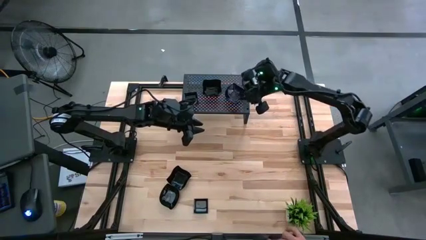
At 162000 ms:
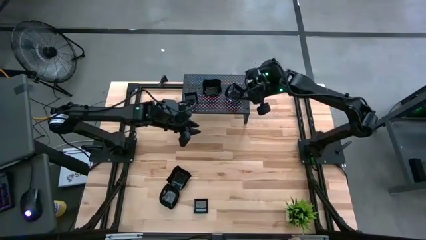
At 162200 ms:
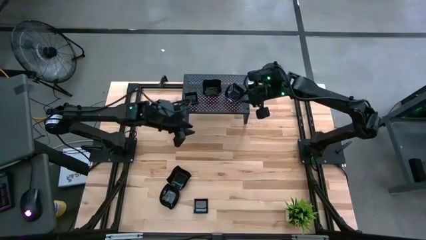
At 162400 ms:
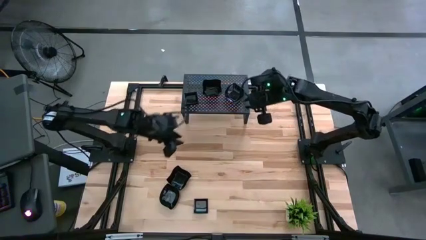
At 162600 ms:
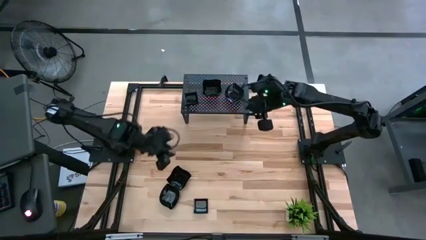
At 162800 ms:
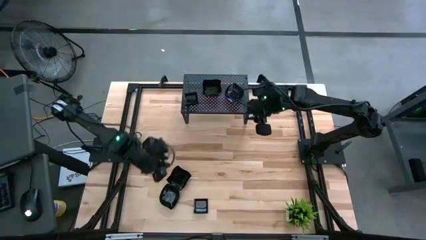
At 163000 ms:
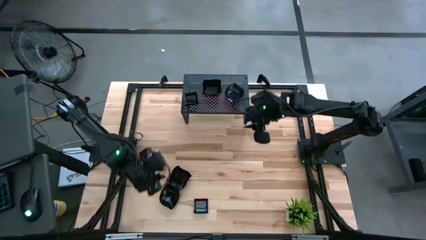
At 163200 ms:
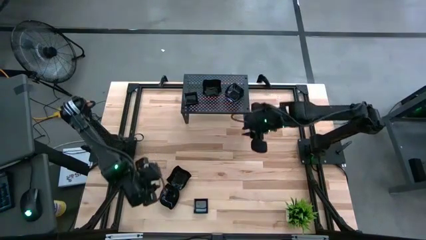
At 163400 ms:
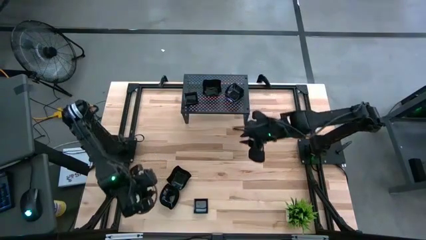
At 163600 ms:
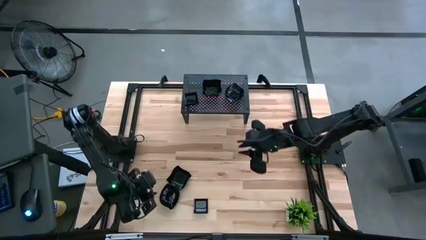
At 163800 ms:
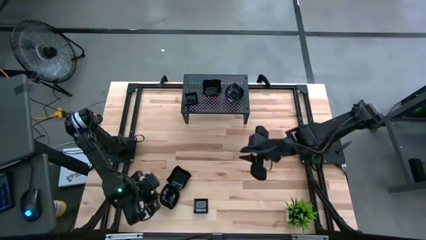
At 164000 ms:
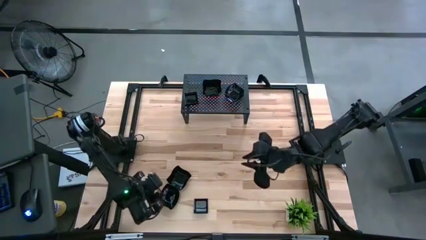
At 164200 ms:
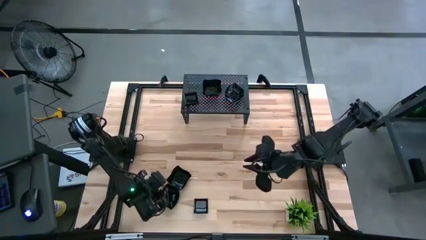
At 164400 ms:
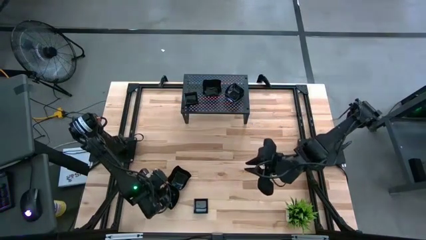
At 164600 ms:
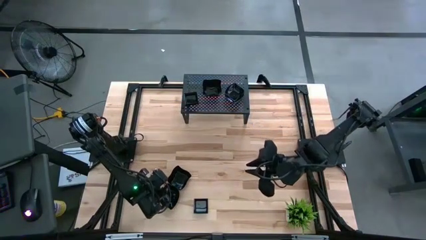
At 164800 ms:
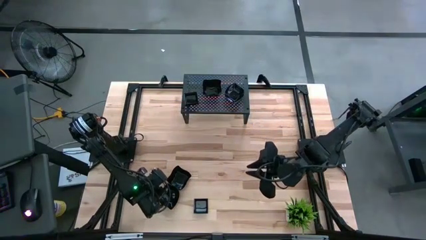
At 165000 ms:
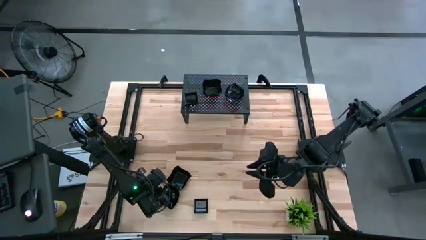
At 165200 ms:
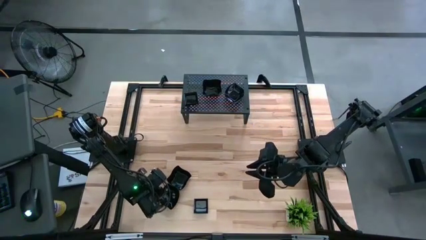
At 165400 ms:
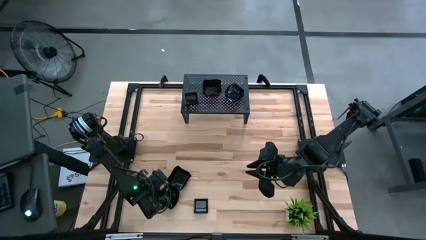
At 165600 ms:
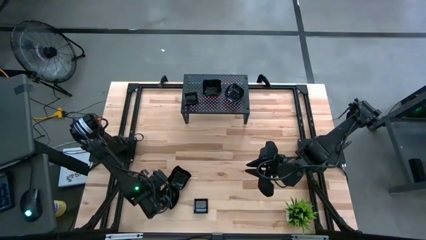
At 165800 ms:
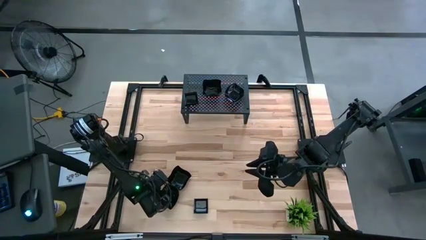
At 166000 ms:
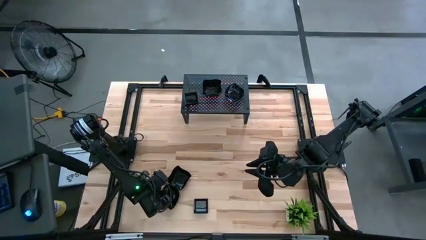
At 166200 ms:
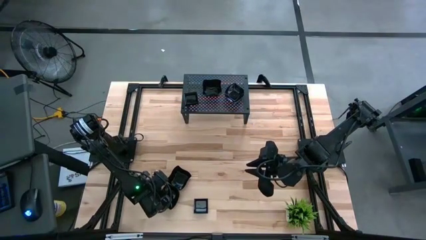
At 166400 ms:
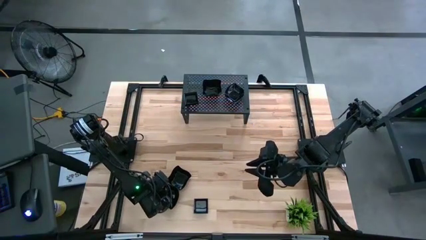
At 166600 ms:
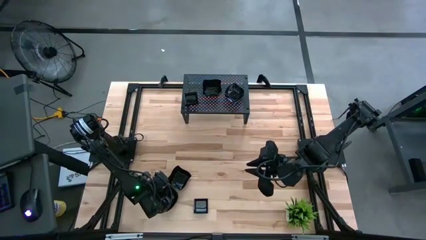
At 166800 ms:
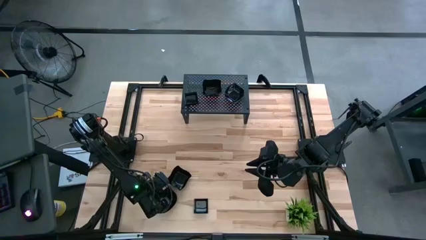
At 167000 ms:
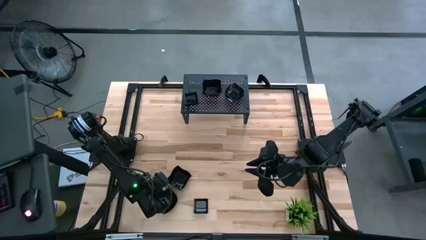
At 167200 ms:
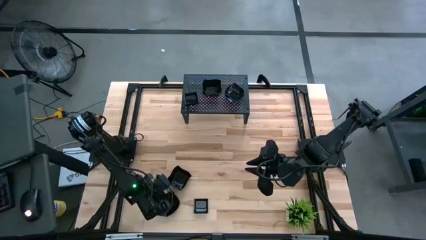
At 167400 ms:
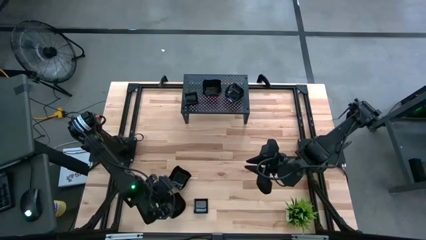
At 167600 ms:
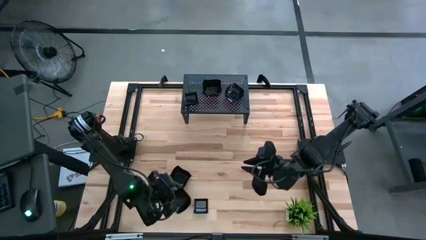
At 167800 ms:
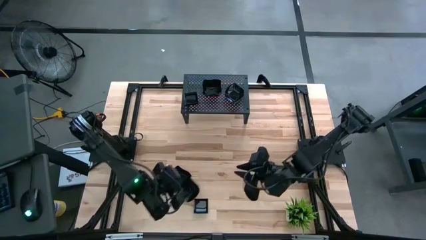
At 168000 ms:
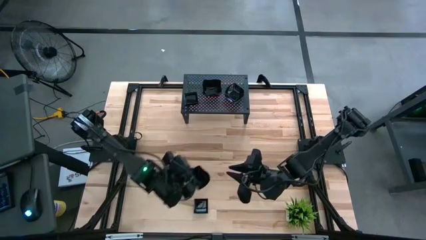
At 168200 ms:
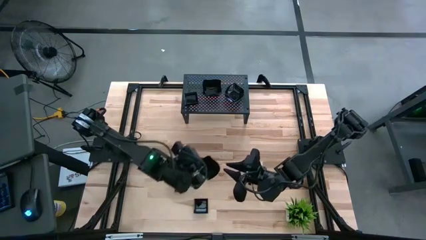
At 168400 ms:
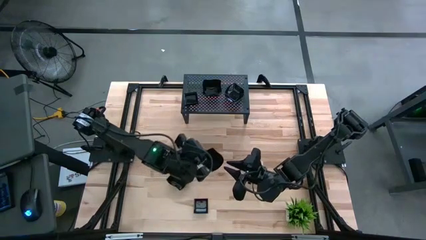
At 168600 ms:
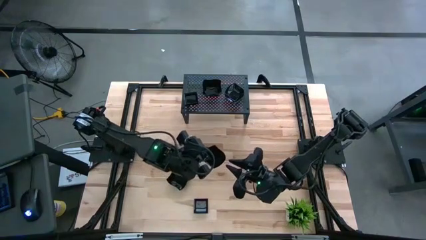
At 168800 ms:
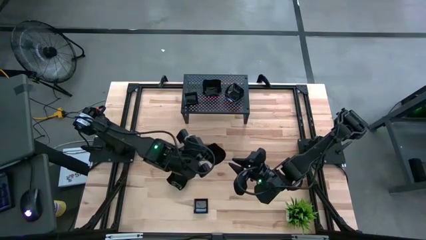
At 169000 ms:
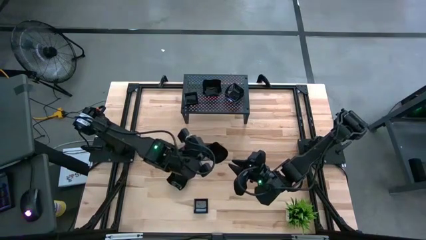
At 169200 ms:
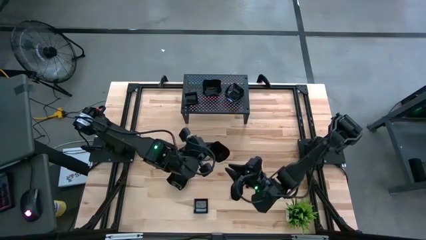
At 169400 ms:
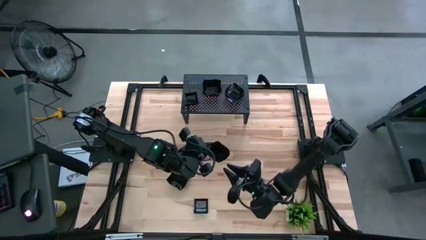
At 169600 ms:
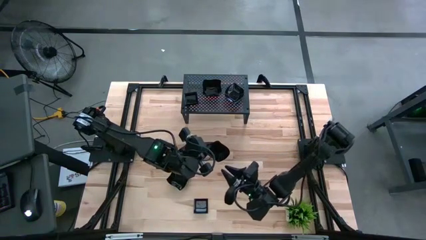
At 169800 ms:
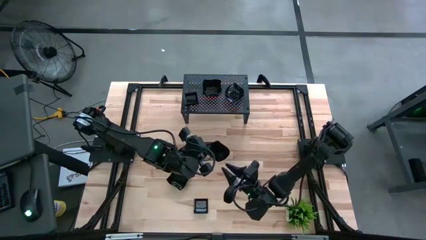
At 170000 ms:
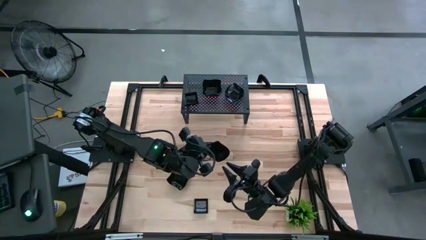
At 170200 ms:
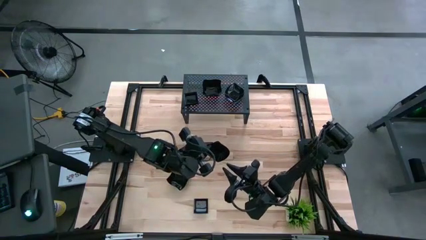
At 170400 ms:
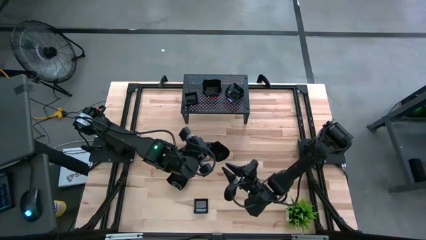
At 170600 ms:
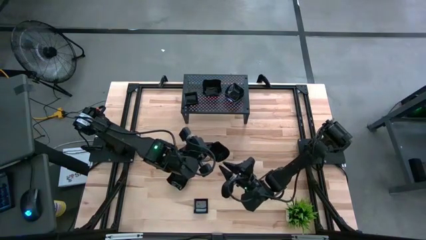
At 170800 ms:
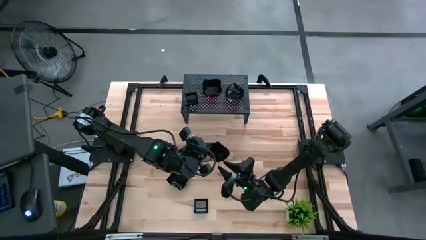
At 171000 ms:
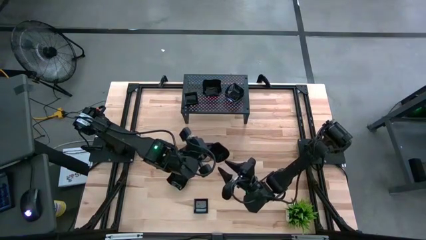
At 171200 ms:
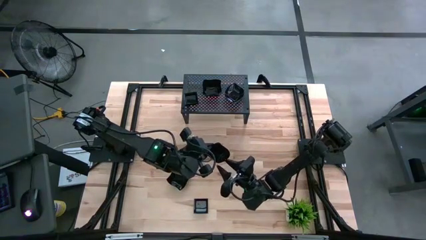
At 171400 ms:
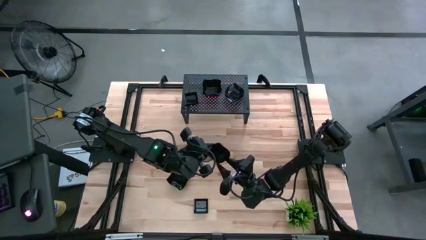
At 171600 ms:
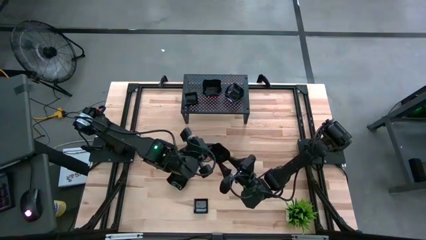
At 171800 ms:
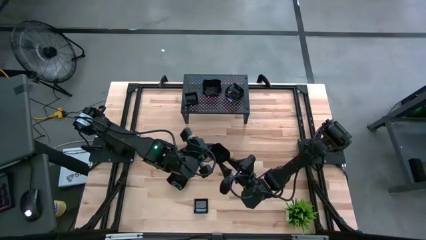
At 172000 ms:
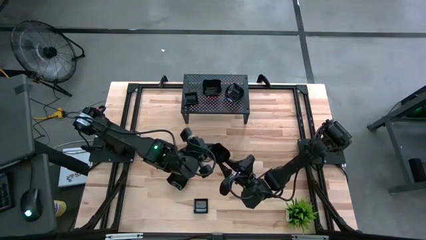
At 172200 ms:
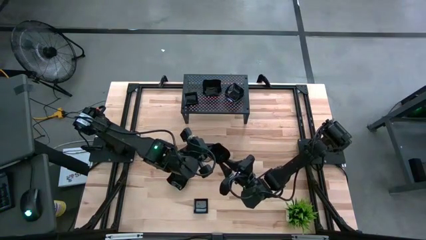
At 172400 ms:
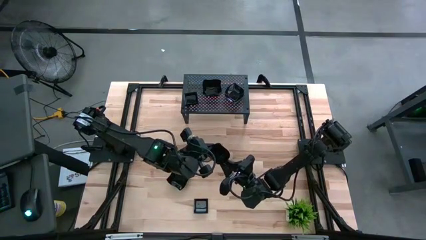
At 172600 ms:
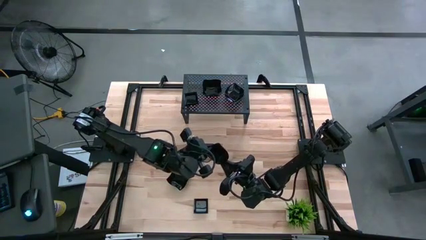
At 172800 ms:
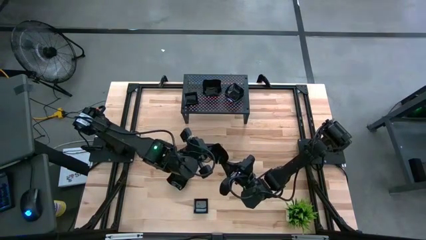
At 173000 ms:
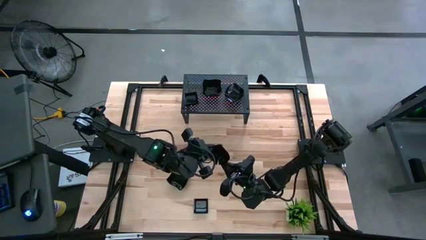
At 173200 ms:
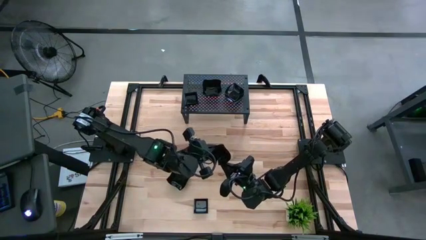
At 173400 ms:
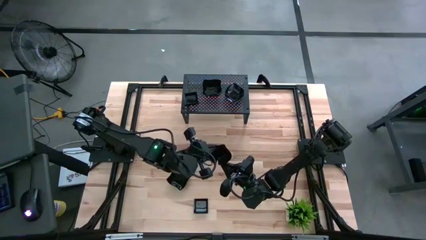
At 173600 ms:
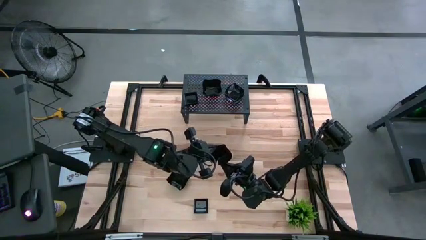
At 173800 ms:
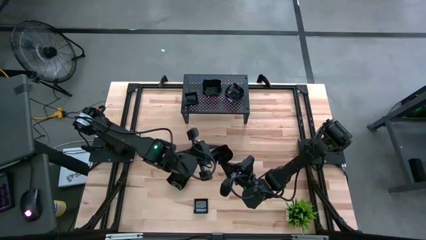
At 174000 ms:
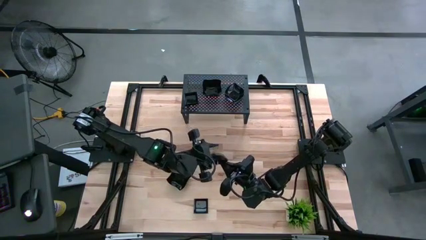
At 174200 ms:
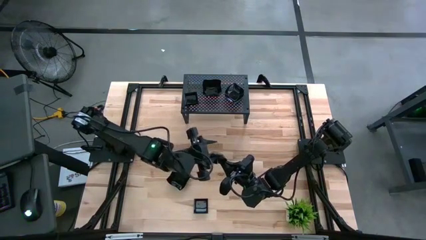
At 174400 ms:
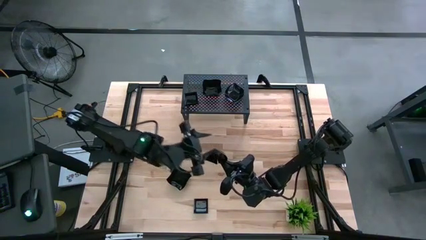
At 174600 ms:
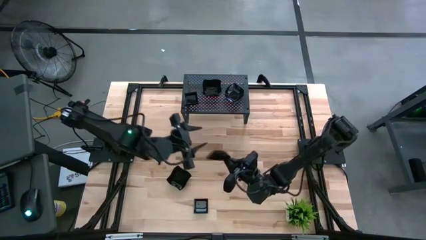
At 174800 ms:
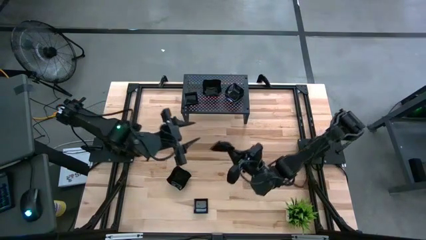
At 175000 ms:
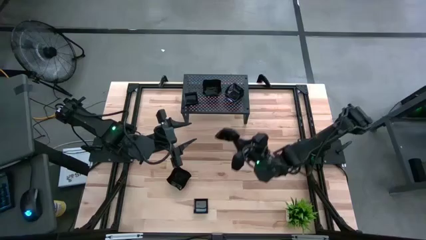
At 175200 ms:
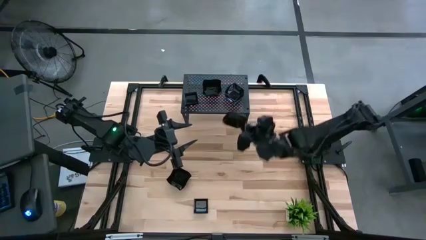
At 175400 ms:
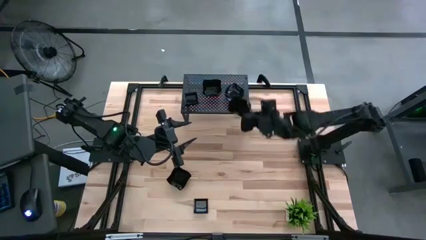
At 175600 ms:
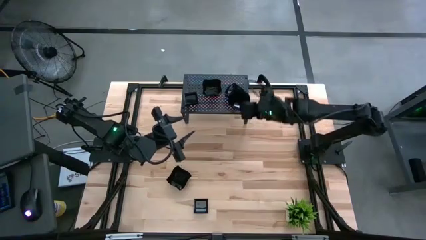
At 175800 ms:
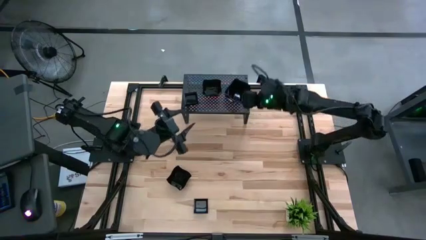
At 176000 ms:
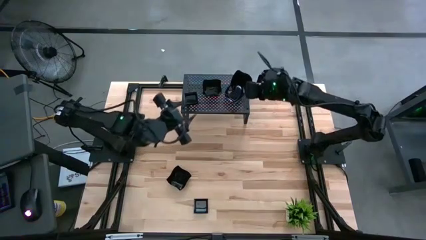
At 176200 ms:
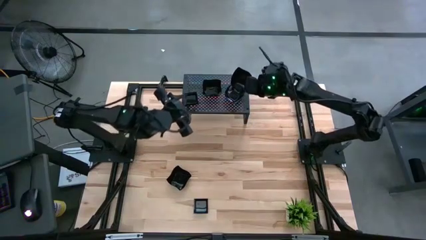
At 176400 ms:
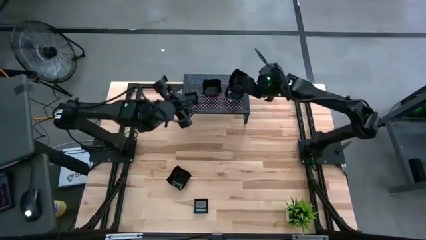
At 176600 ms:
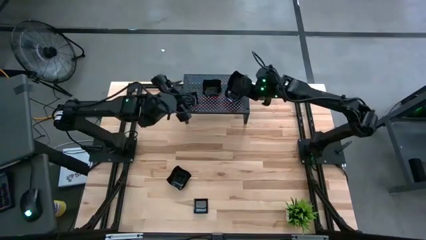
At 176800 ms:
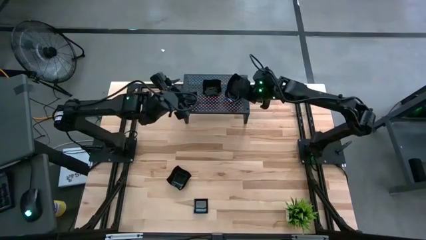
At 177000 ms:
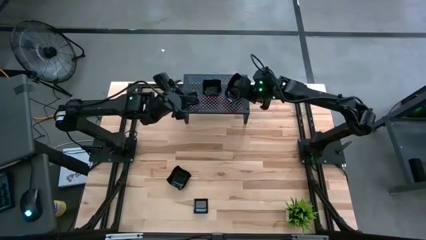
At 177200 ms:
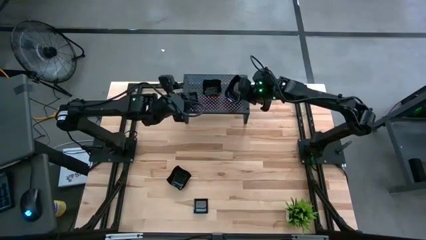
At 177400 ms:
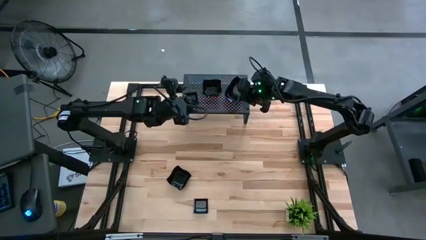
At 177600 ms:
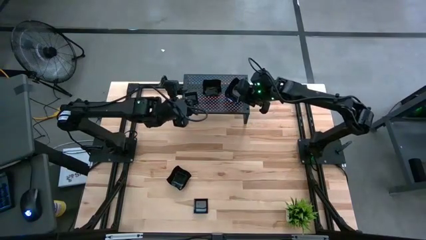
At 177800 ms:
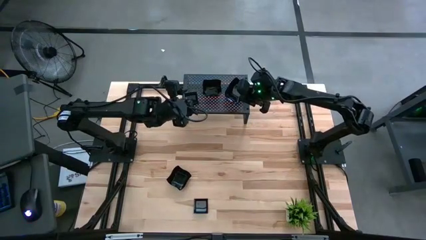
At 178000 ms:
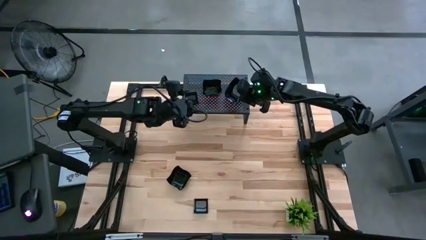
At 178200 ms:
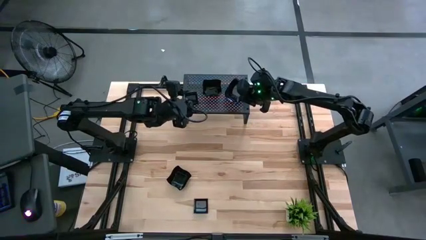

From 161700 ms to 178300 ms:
Task: Pick & Place Mini shaped plates
Stack the leaf-shaped plate on top of the leaf-shaped plate on the shelf
